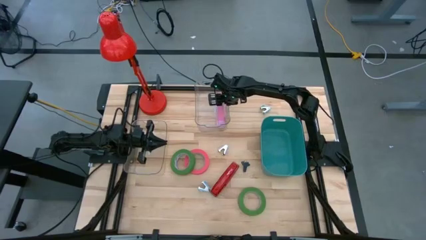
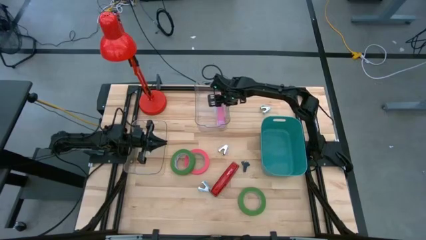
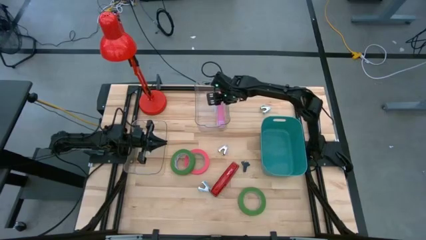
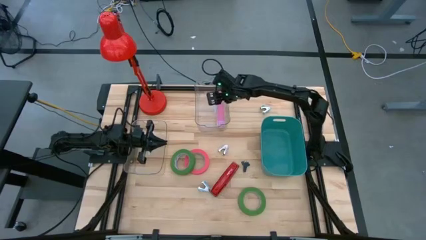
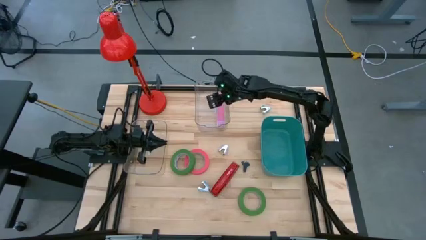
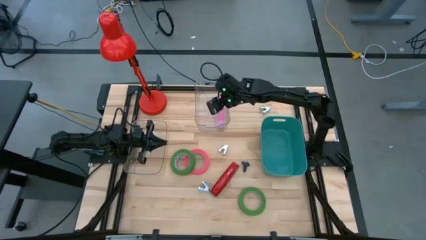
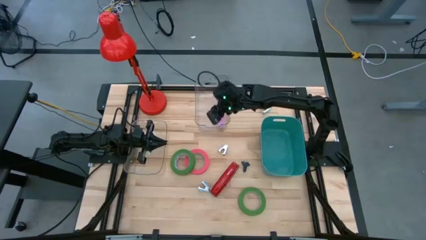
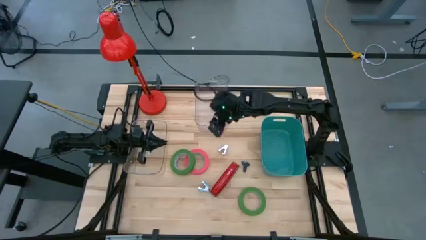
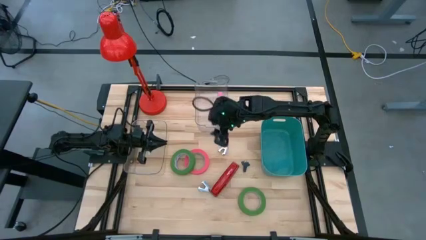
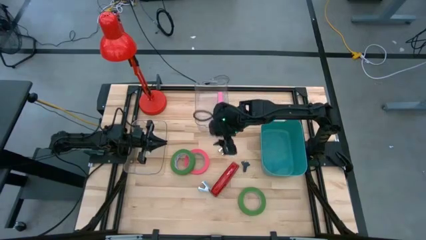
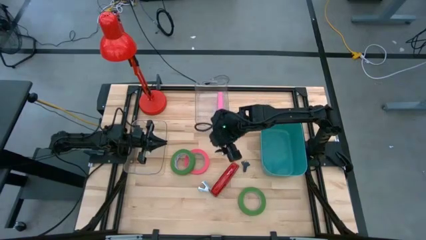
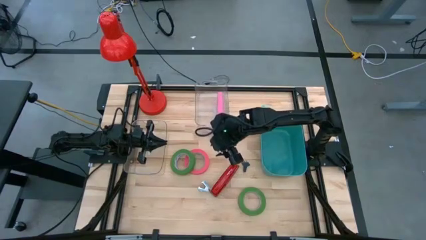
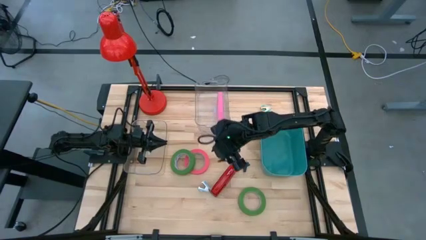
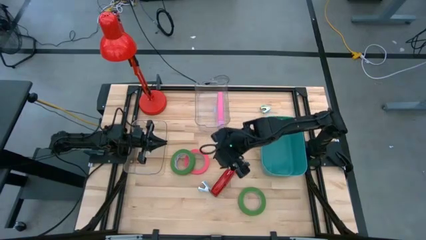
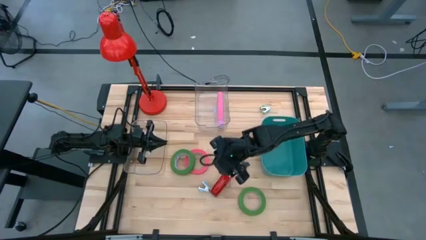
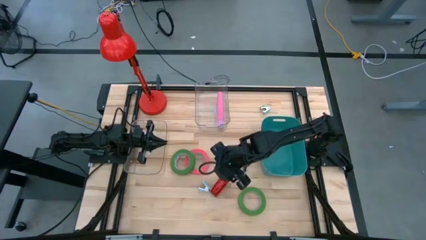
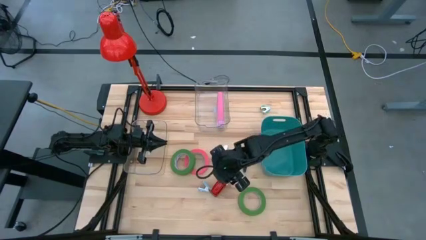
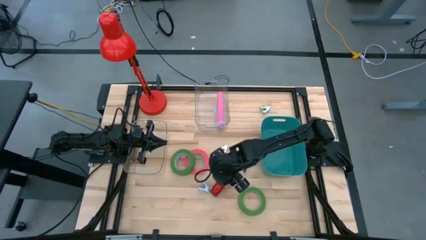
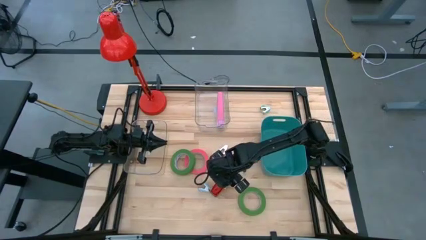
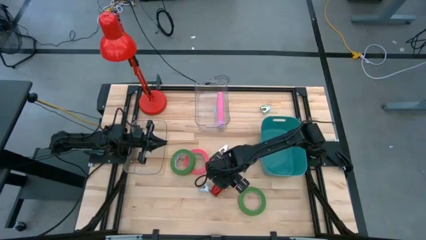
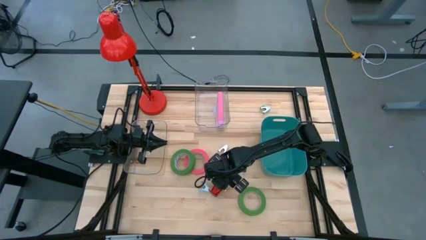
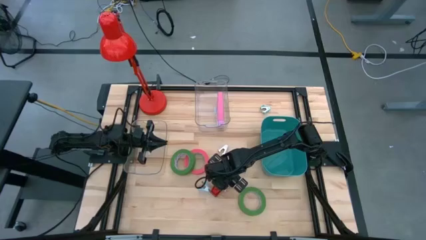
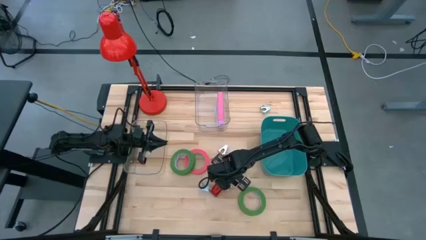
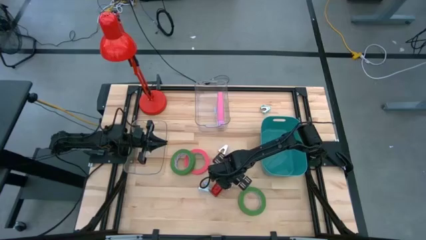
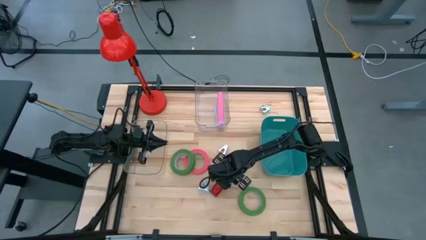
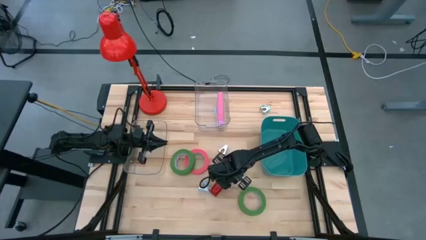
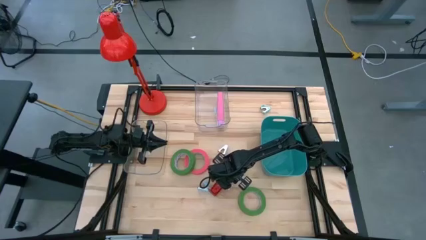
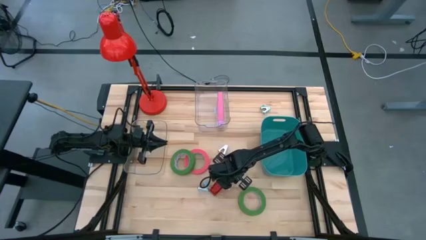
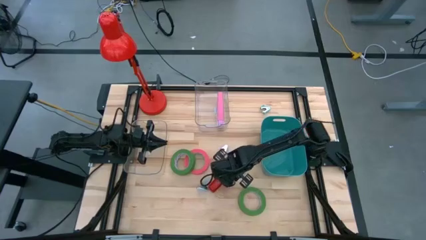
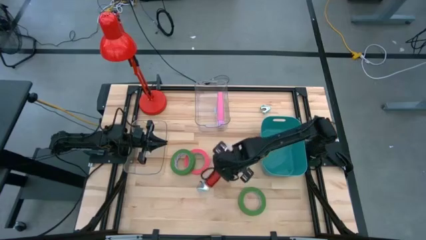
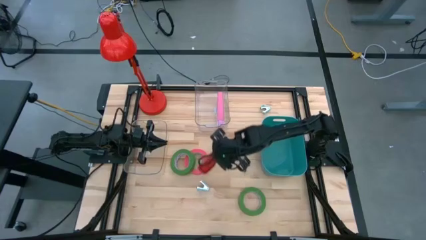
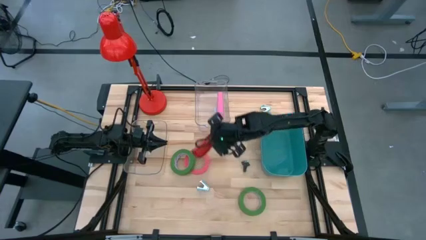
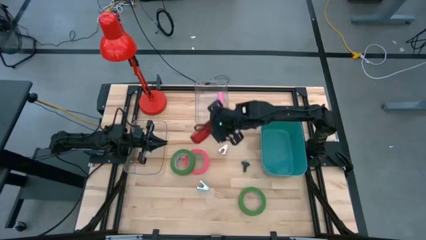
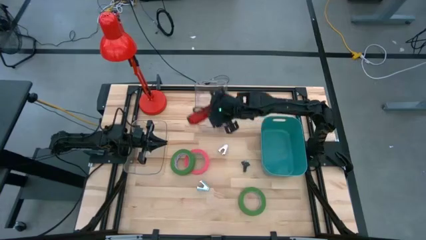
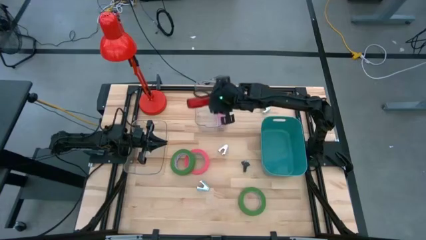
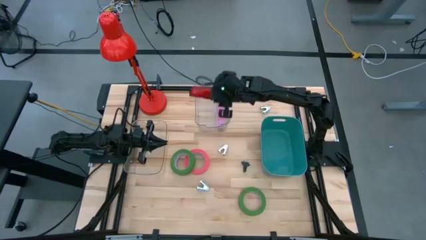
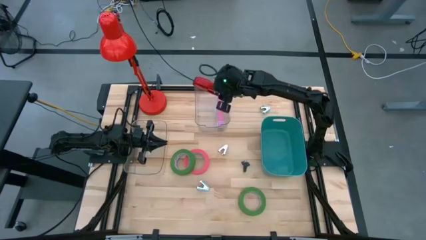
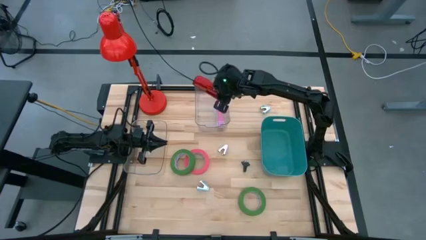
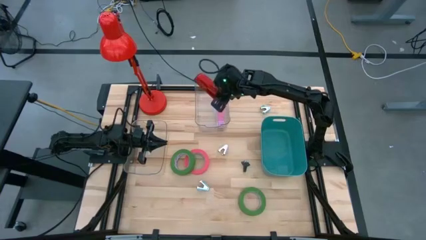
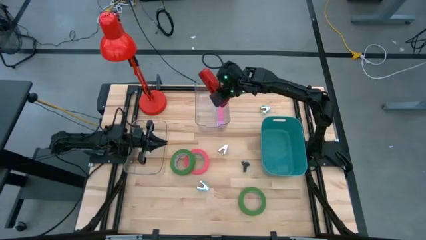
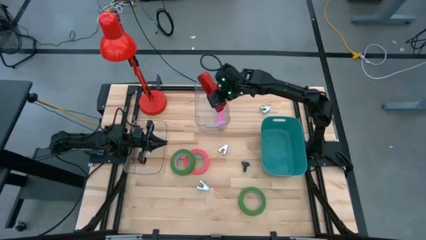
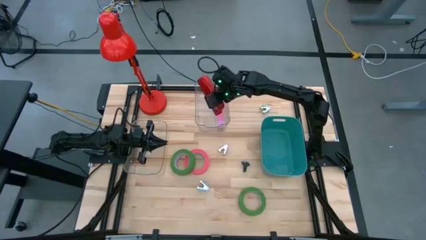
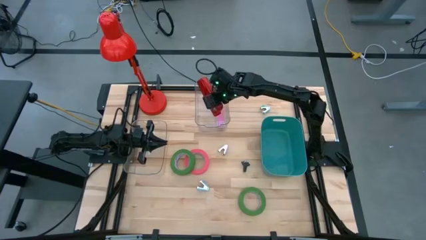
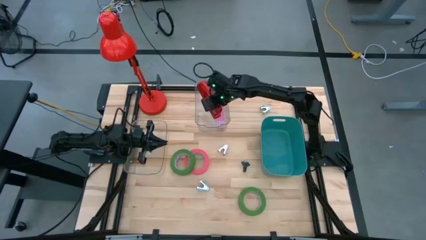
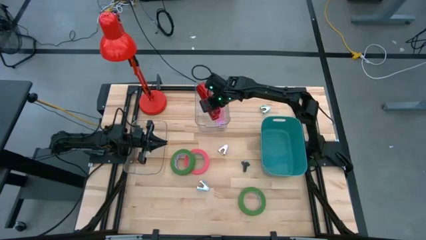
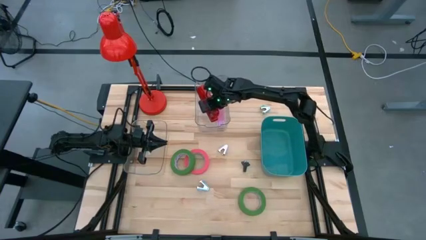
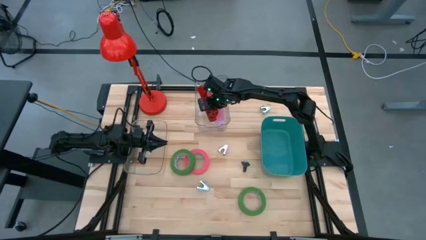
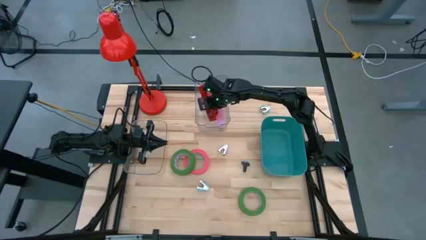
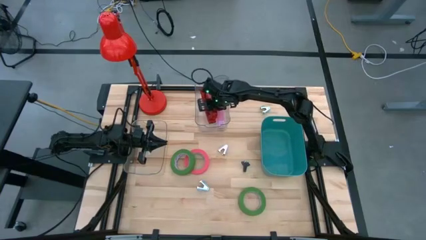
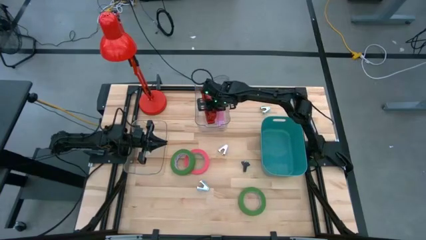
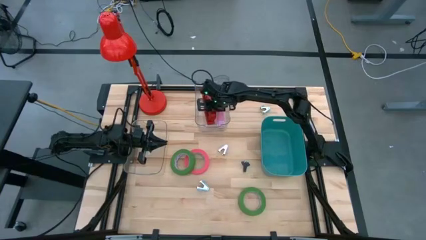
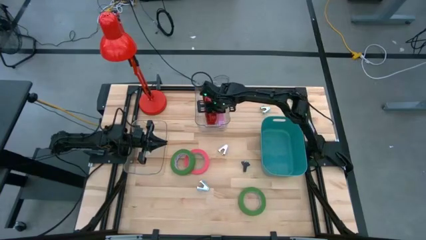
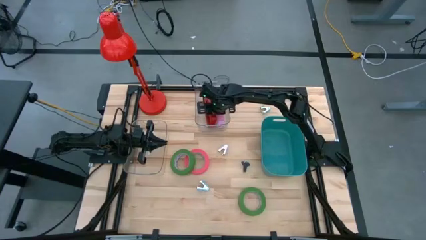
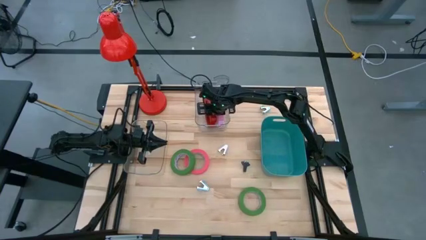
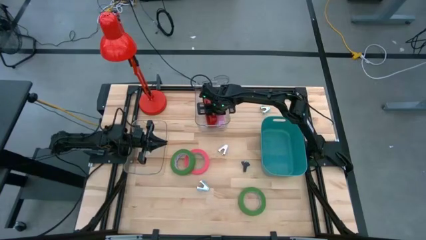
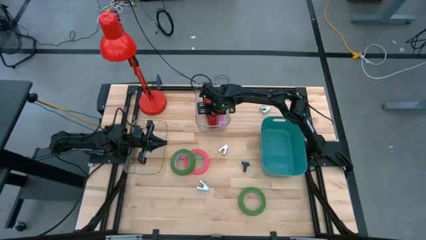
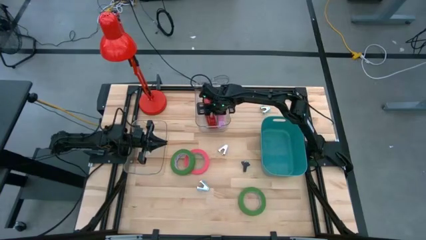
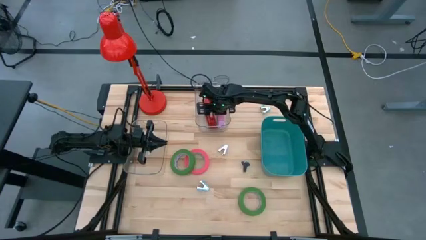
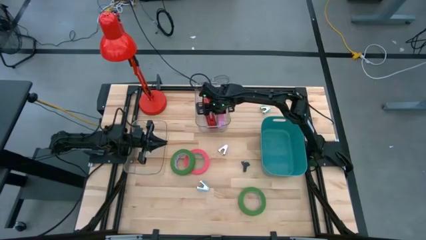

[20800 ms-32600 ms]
Task: Pick and place Stapler, Stapler remover, tape
Put the red stapler into the right transparent bin
